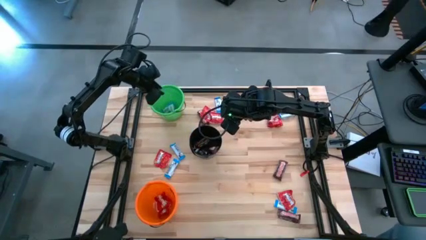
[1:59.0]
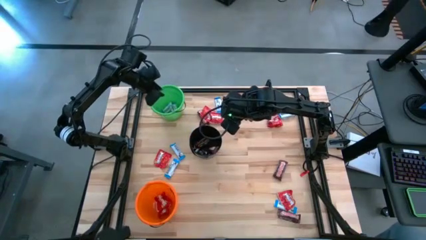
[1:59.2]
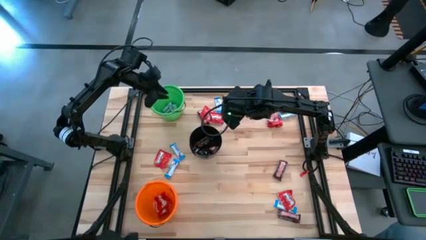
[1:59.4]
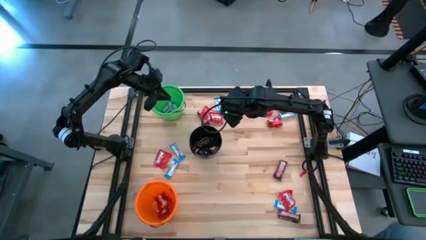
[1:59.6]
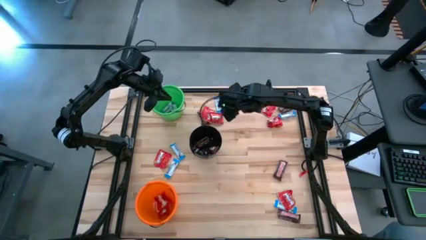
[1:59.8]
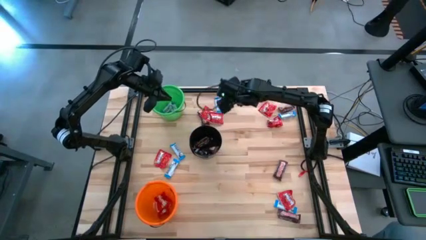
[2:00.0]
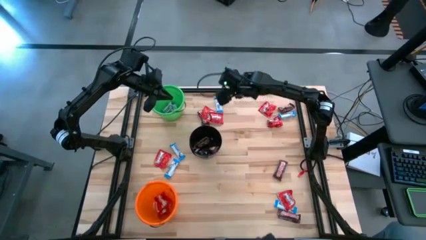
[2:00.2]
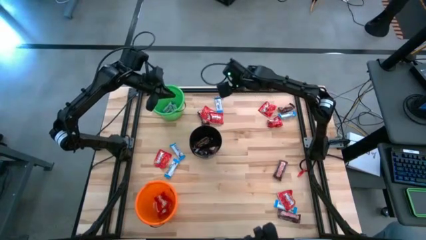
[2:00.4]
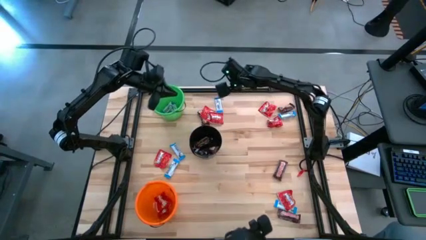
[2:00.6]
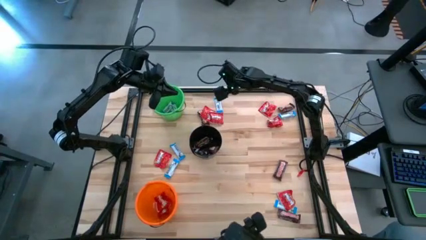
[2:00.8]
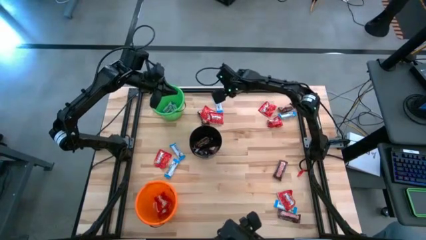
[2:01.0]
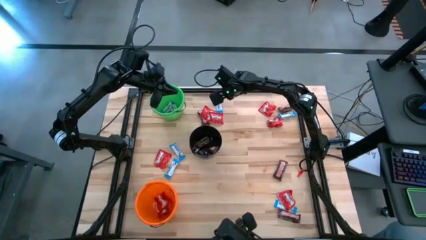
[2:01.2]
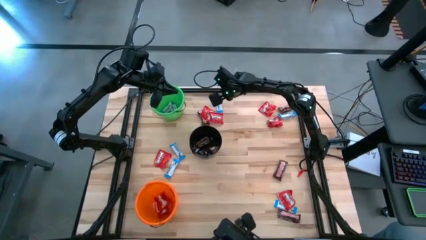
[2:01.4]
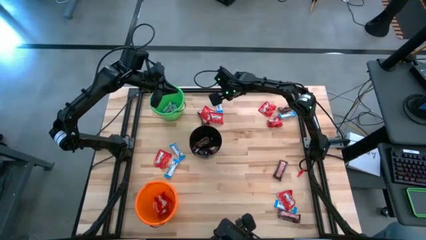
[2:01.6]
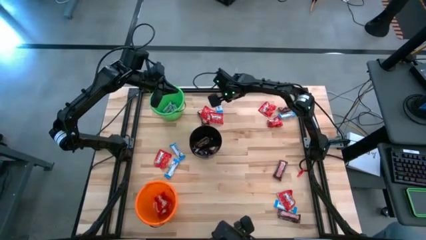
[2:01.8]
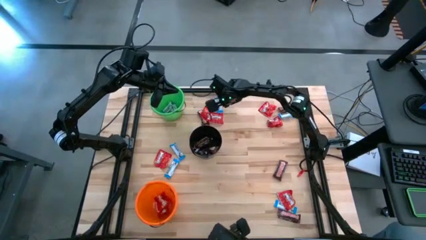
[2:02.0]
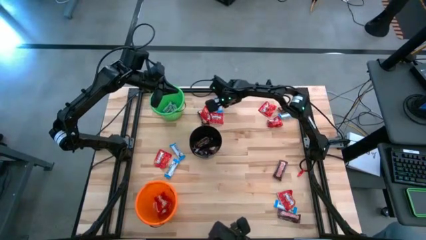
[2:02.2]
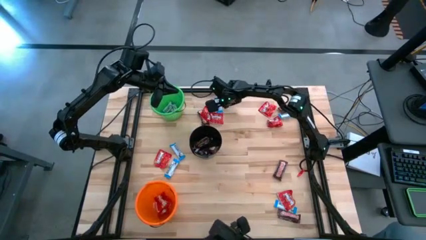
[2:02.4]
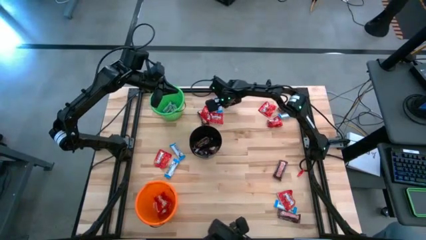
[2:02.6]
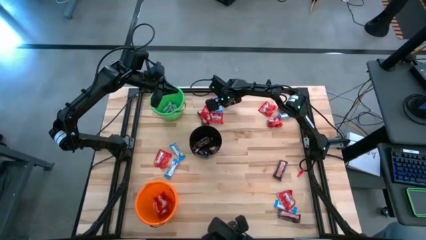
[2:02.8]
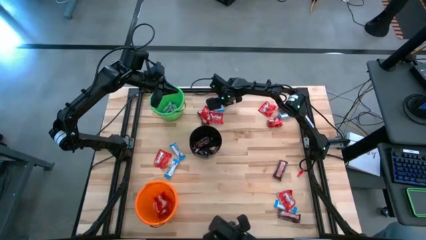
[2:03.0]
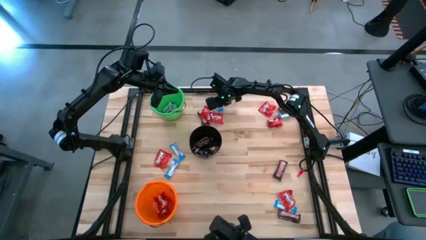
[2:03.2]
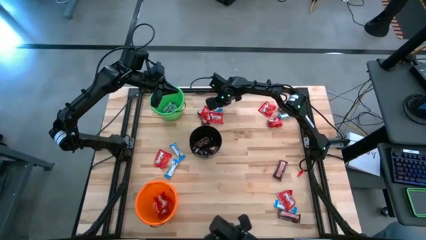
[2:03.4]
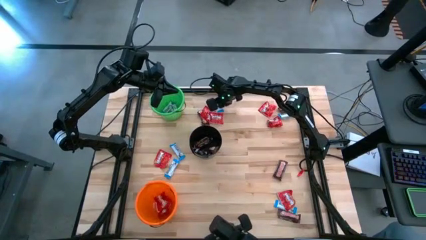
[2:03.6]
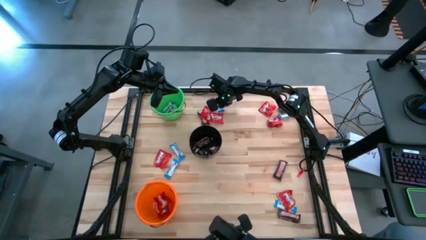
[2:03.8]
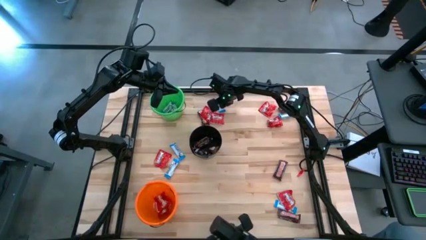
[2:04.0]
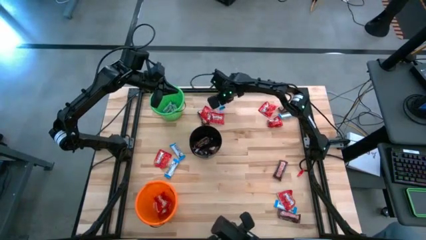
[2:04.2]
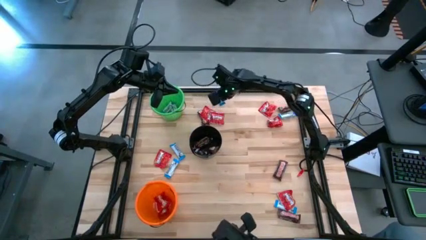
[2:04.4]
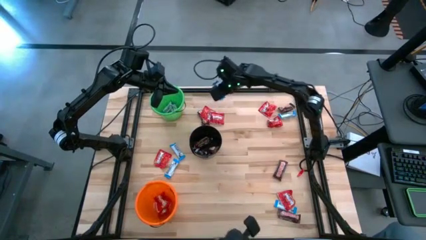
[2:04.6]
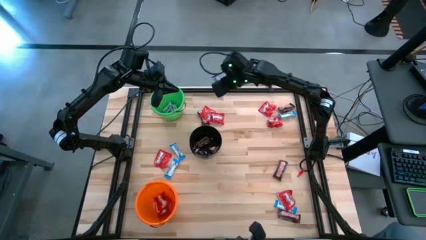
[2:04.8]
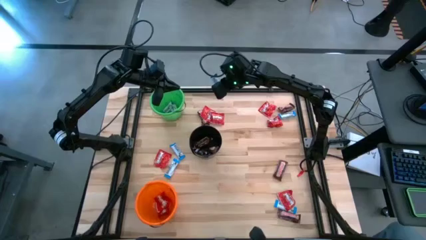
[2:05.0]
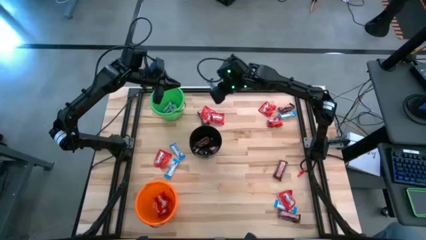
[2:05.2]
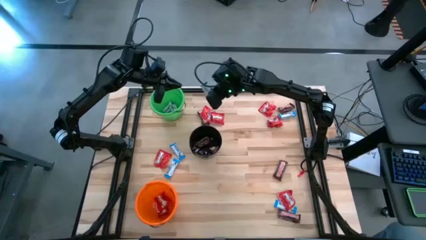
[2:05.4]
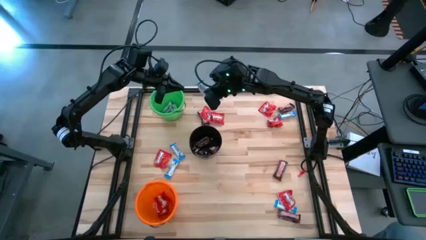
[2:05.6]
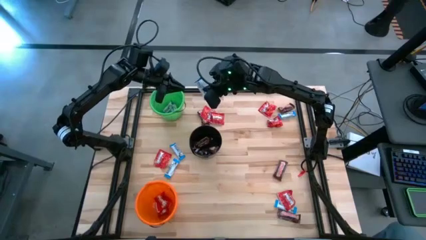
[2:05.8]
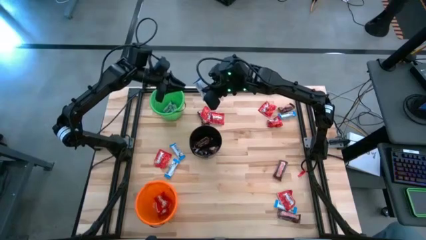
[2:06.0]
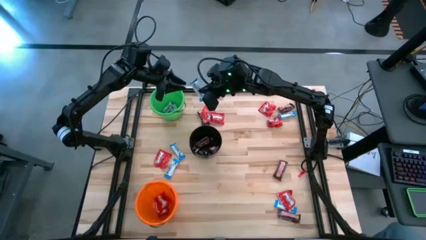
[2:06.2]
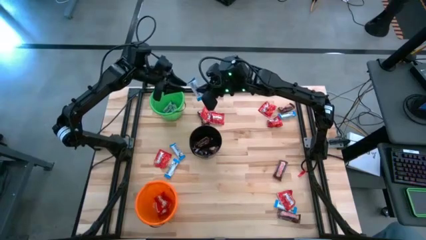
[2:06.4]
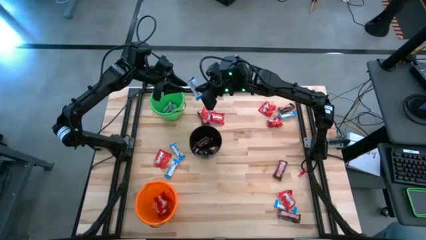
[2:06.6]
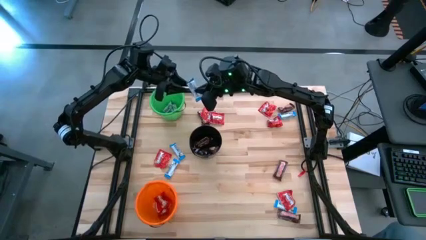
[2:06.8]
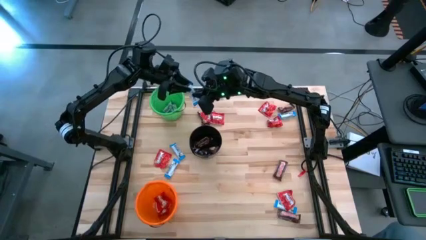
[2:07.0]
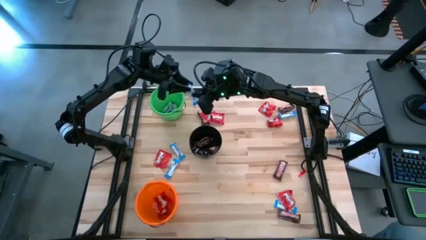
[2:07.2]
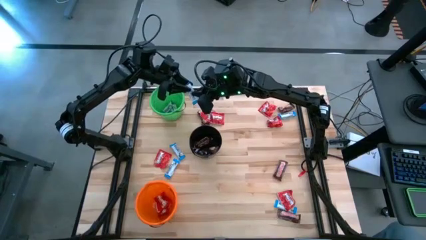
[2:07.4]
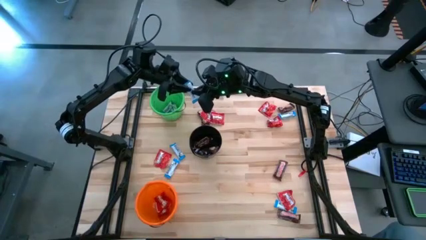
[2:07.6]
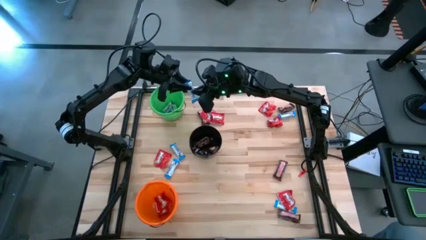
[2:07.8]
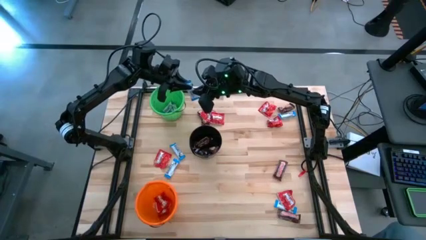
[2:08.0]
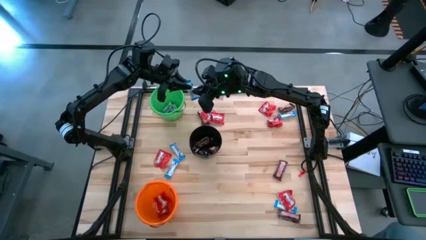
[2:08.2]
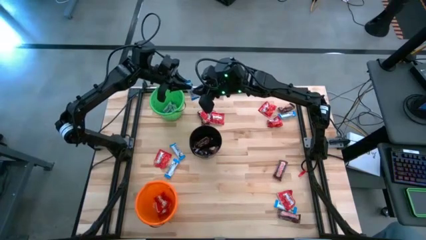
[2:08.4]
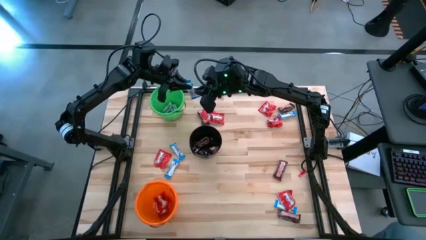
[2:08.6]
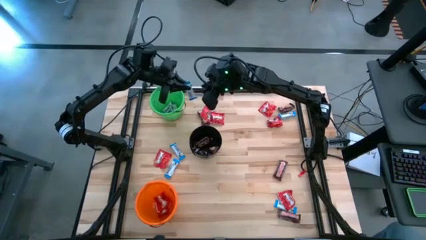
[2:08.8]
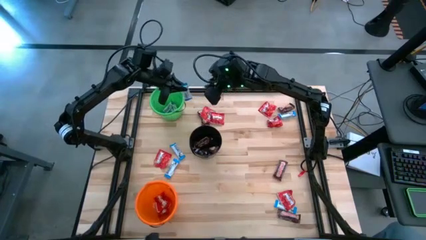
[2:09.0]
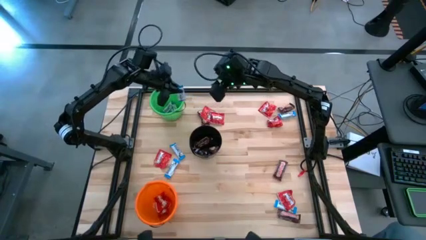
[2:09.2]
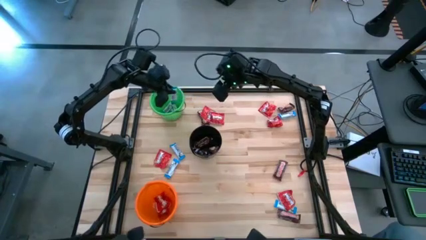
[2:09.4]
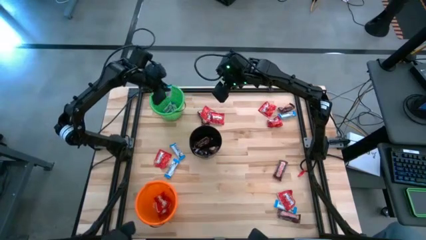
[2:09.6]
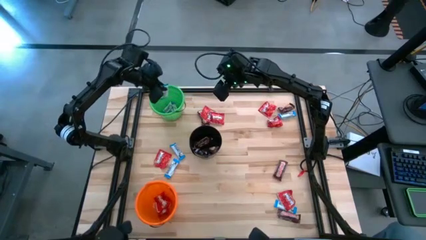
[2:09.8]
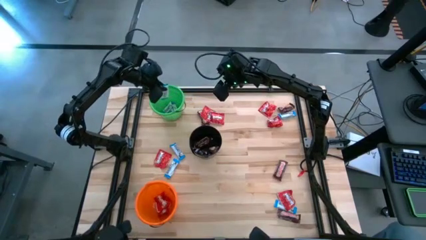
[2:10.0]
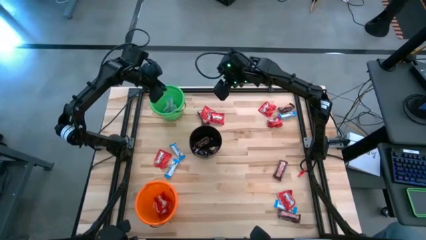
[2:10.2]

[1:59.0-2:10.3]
Task: Sort candy
Put the white chocolate into the green bucket

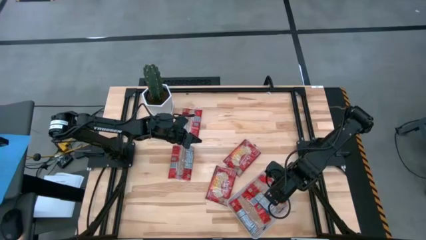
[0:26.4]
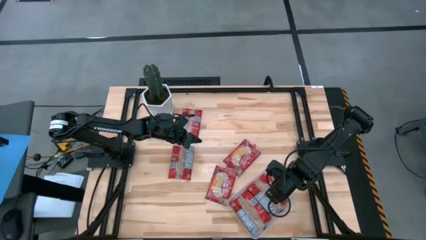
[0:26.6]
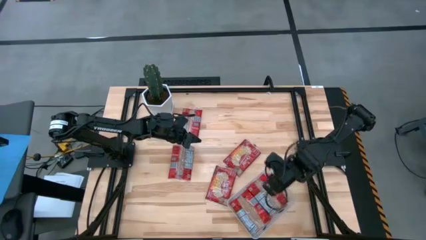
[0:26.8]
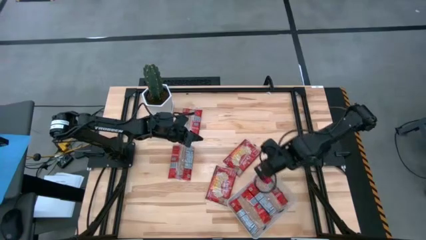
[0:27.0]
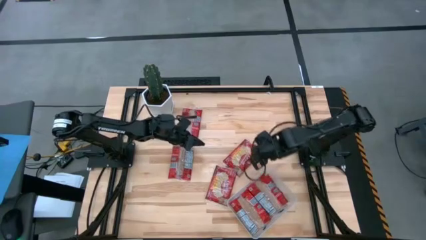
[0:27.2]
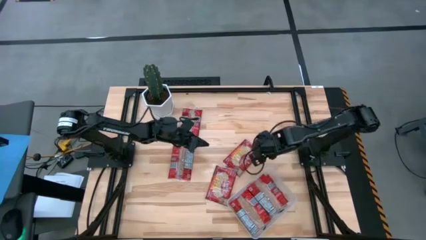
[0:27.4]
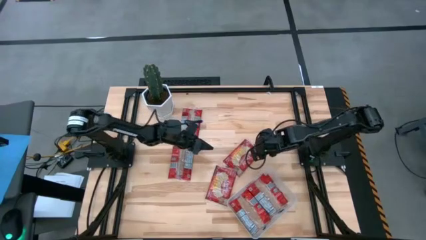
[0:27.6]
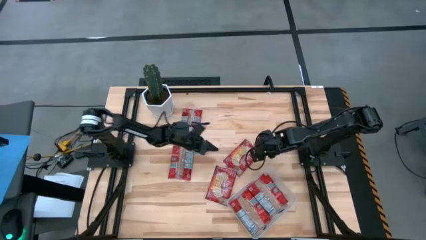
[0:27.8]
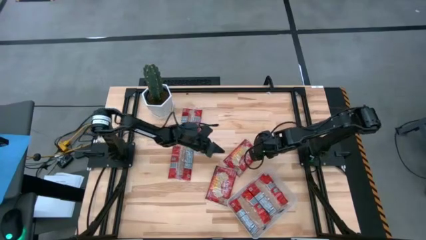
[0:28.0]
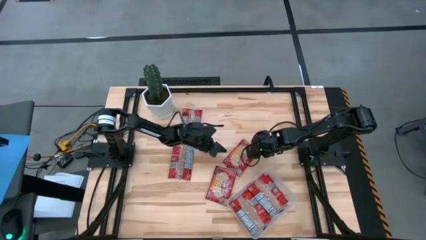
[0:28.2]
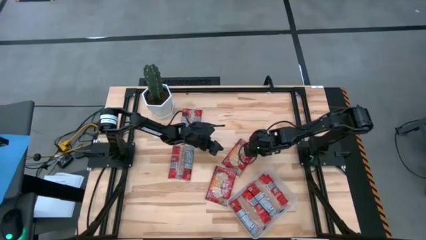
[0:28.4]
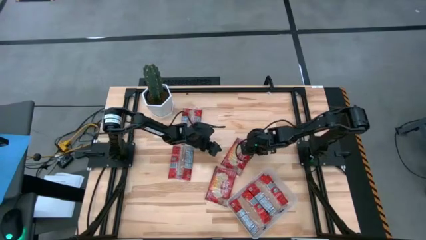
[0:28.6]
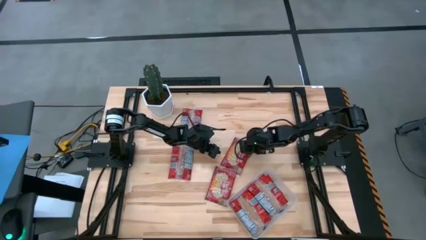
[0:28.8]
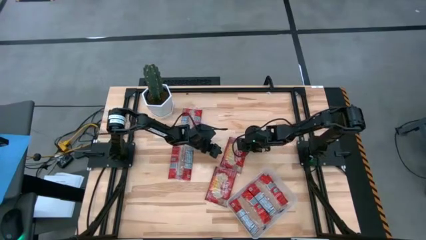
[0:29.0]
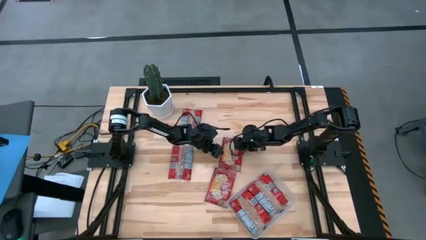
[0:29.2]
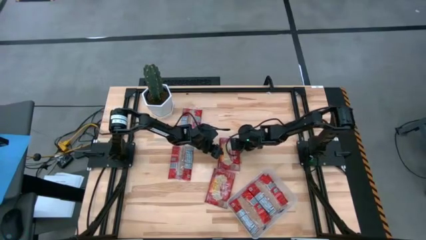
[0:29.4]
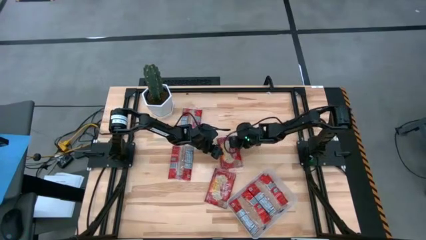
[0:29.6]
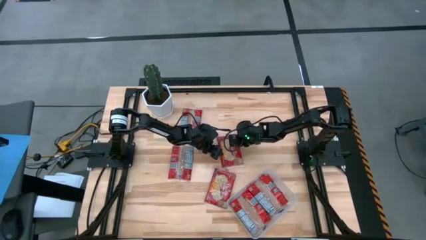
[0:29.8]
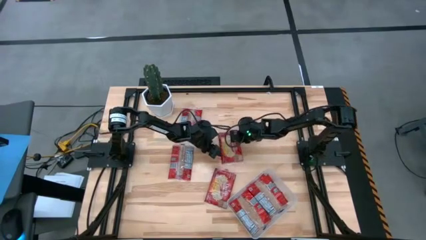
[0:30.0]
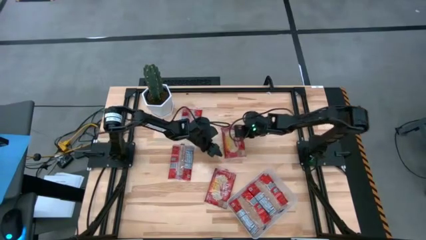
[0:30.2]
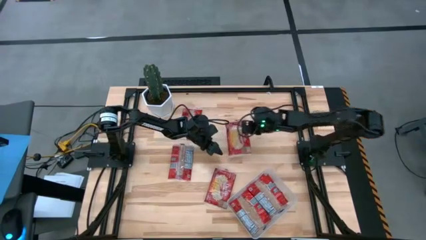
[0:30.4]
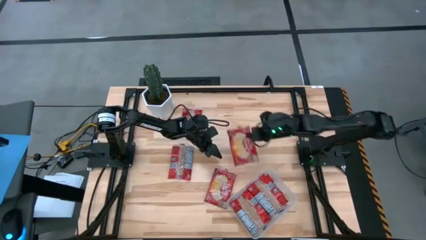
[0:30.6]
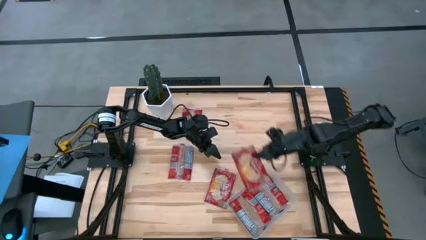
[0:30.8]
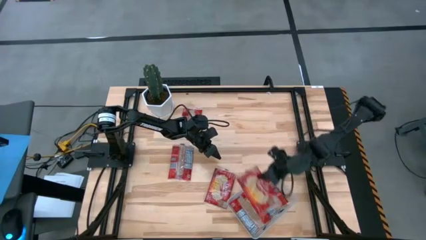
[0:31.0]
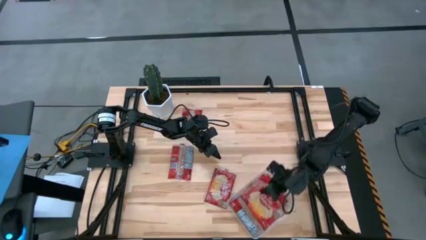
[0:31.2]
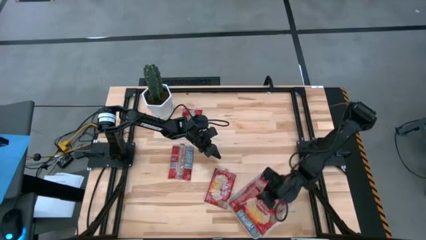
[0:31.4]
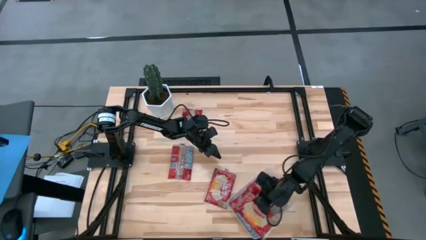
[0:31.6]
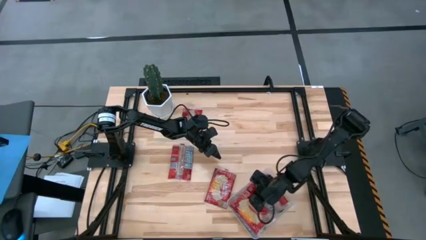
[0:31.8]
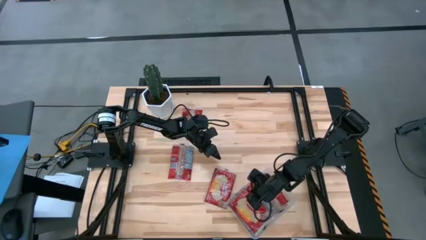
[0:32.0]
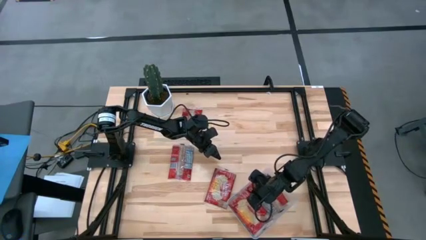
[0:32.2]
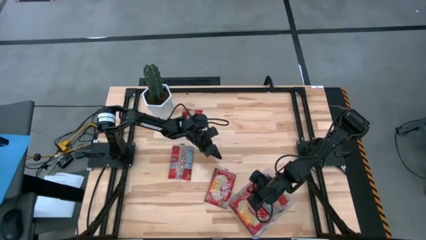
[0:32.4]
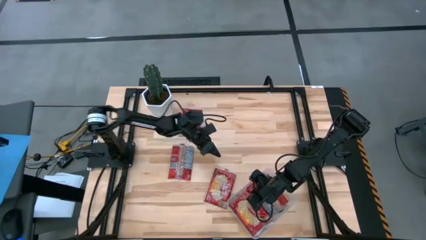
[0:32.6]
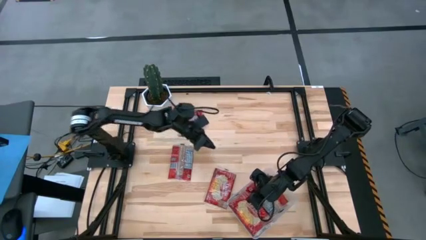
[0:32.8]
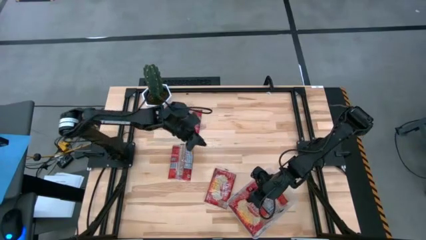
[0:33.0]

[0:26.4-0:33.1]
Task: Sort popcorn bags into baskets
Put the red popcorn bag into the transparent container
